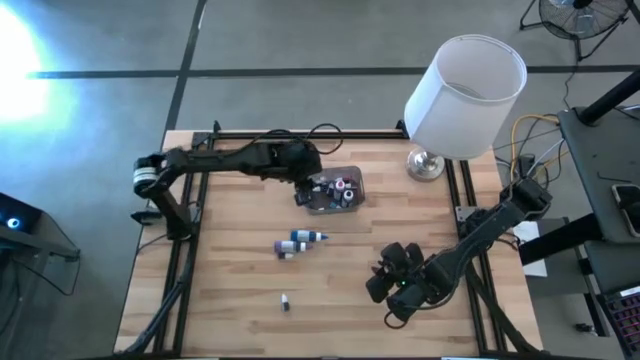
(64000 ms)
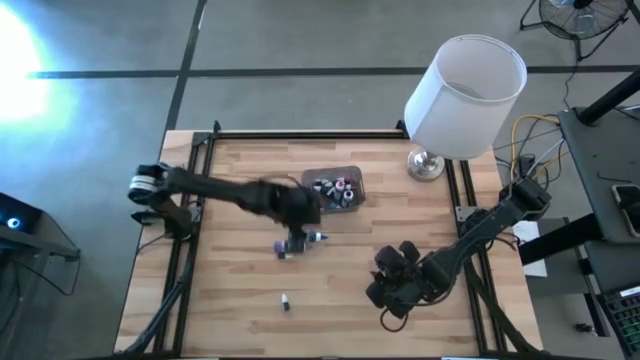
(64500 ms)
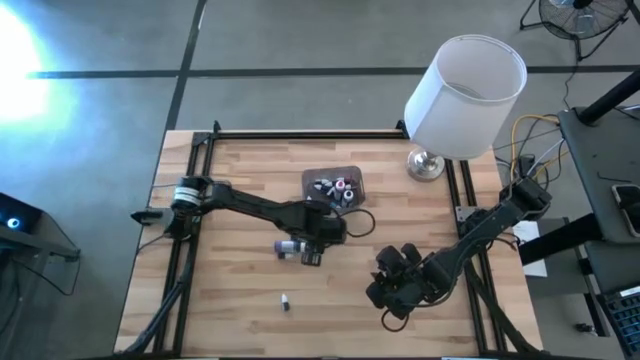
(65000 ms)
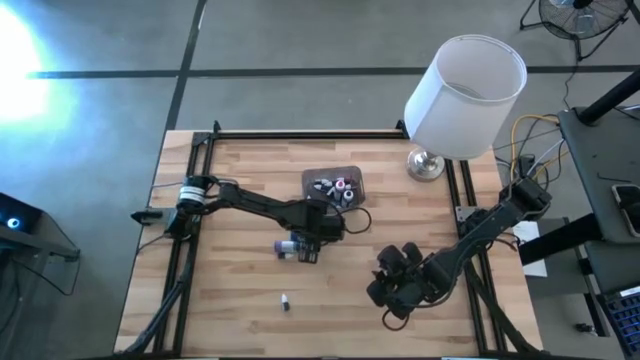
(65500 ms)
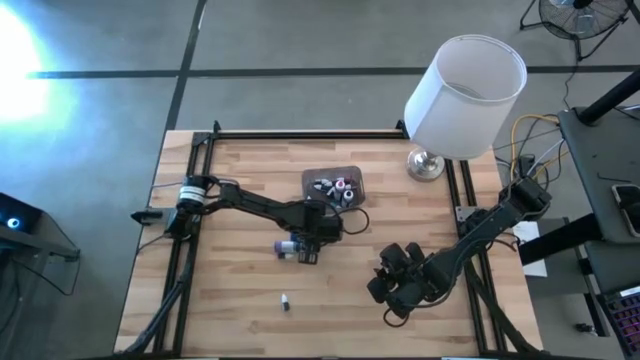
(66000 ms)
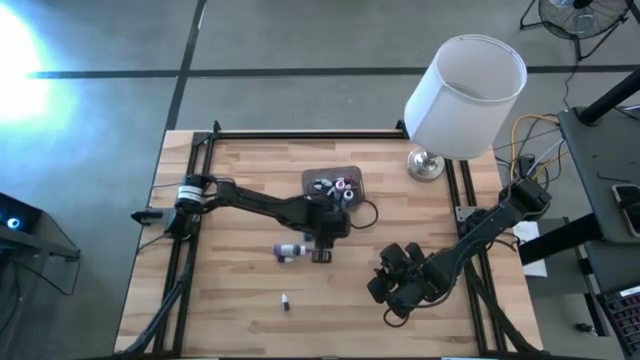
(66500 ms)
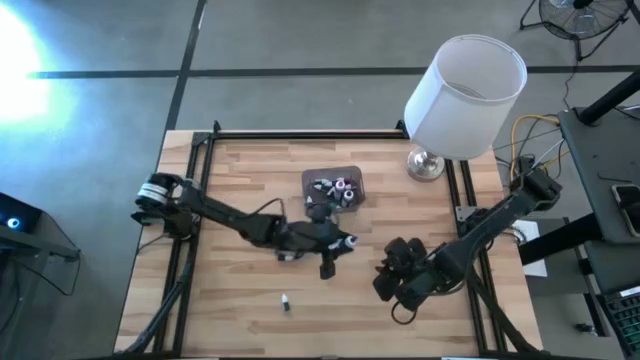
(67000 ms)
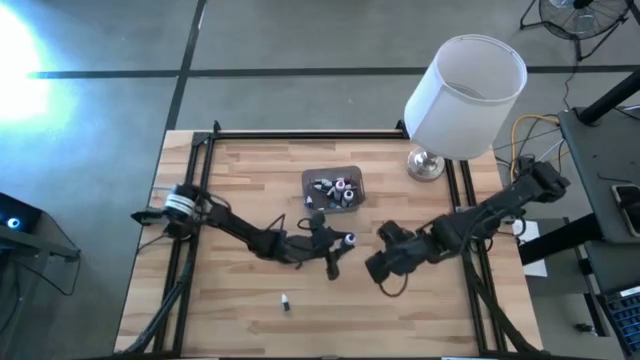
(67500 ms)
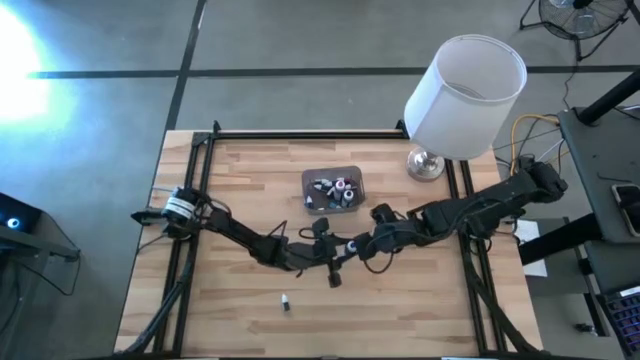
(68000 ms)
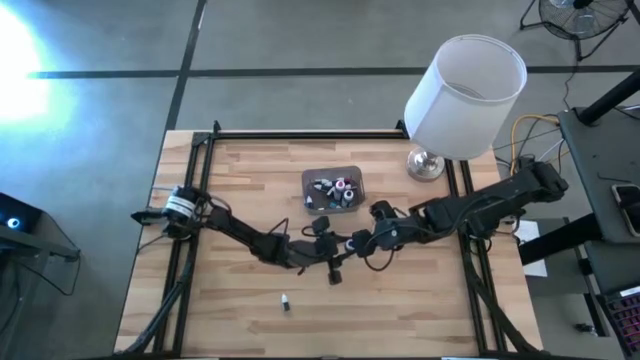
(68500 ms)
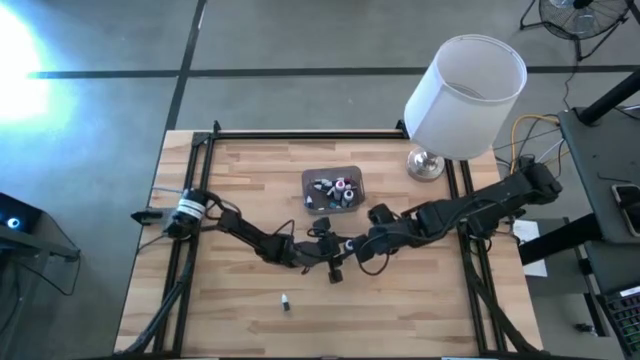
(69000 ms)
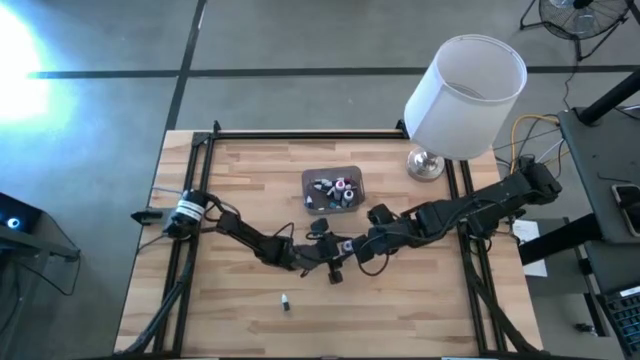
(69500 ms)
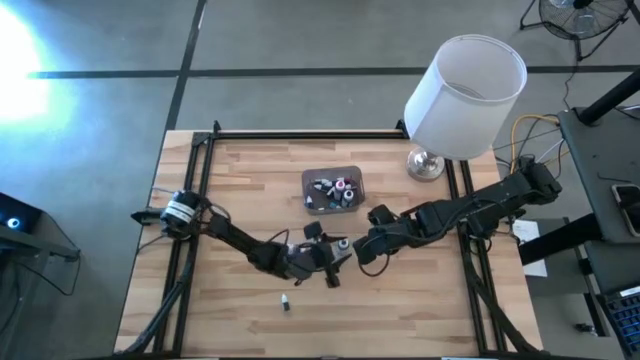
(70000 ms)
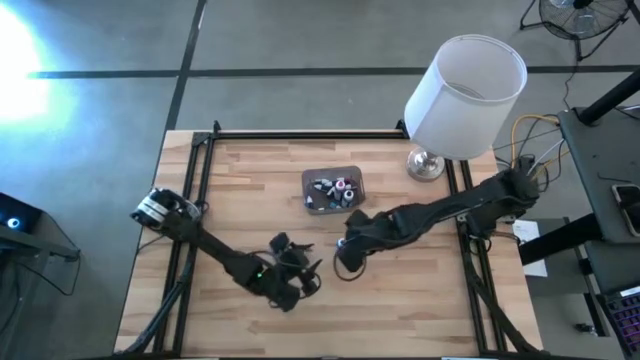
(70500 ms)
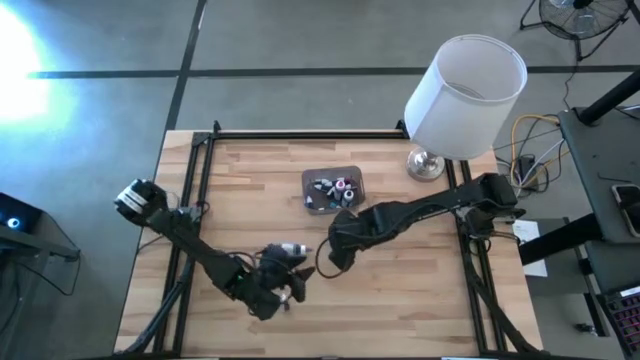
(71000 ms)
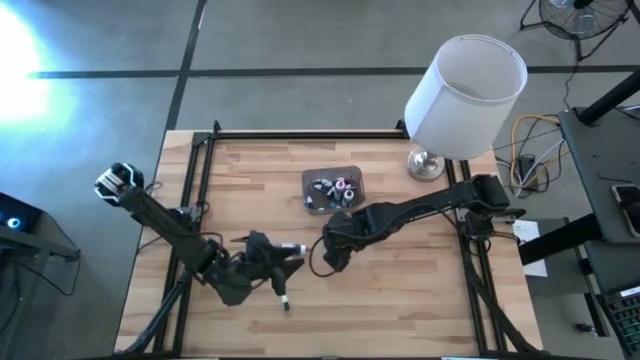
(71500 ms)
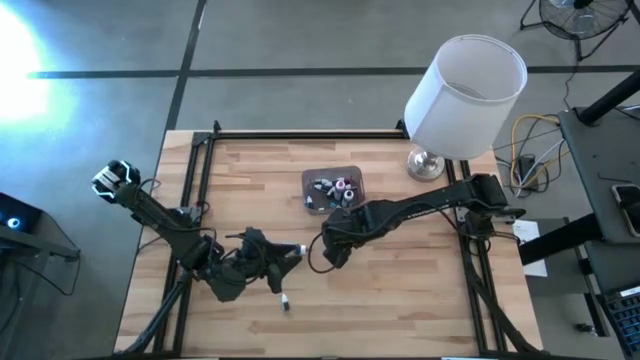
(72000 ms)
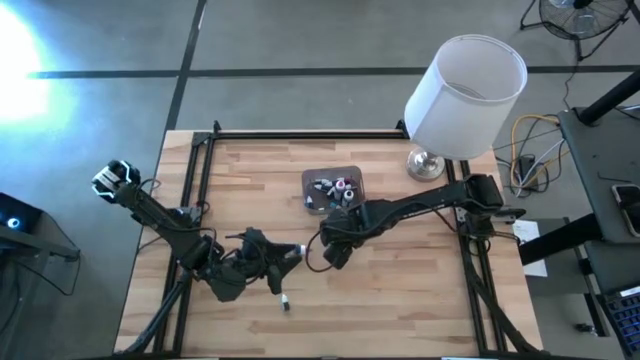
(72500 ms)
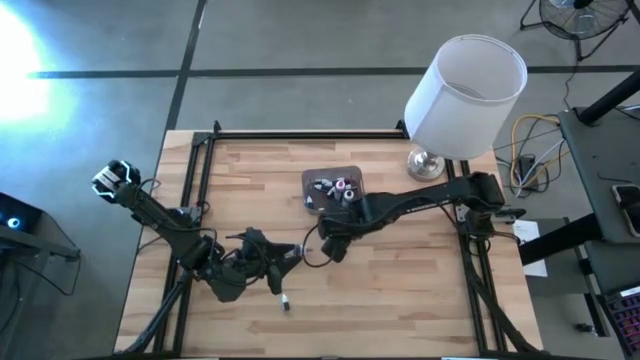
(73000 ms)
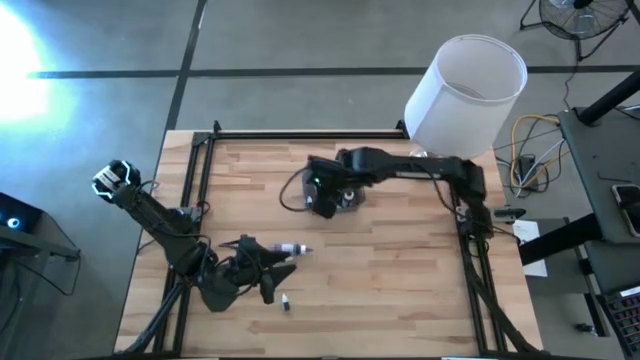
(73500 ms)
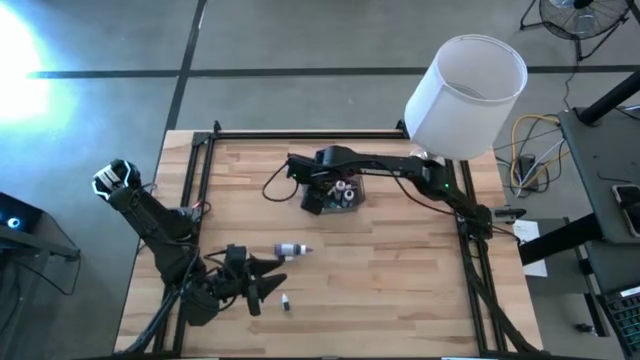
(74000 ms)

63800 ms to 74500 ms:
Task: Pick & Place food coloring
Put the large blue food coloring bottle into the bin

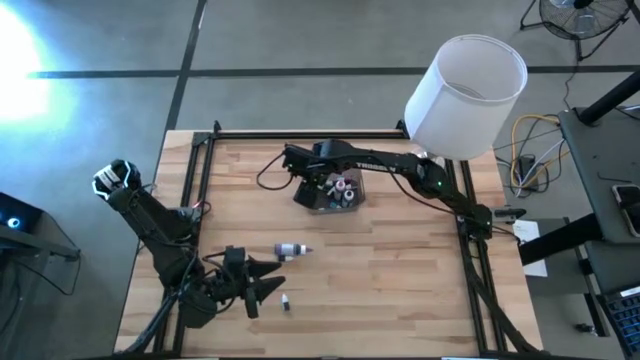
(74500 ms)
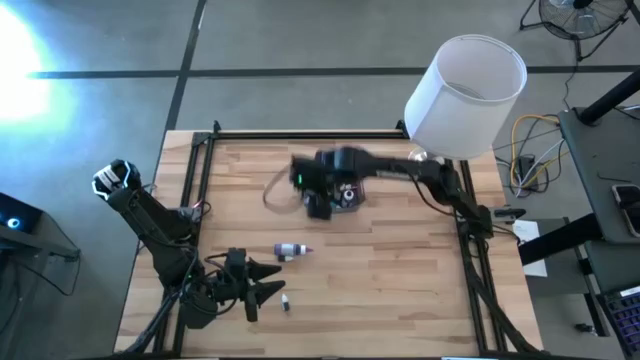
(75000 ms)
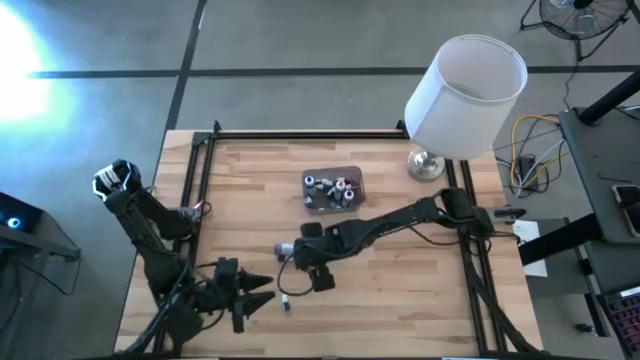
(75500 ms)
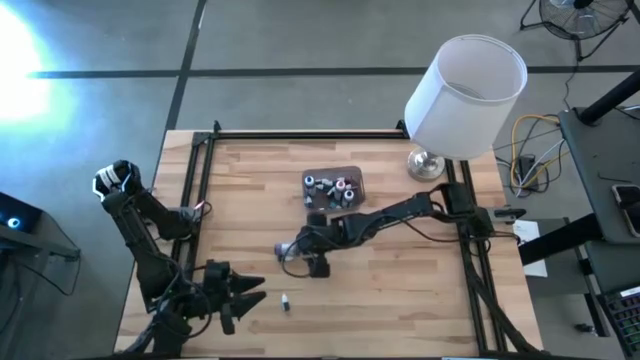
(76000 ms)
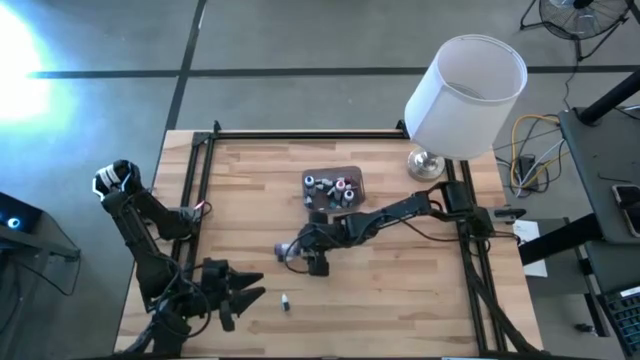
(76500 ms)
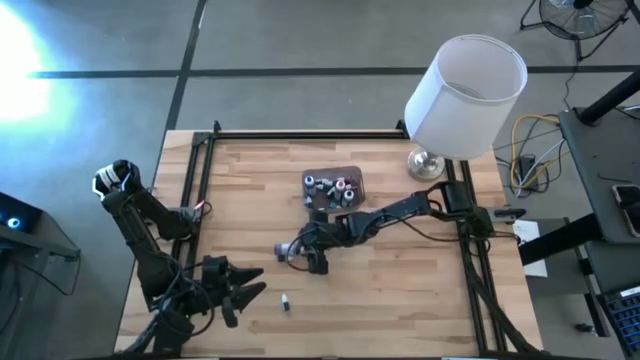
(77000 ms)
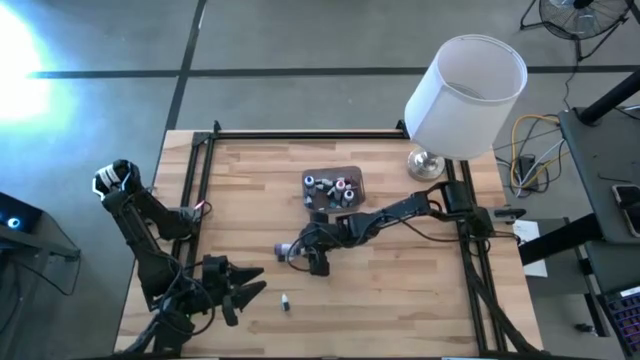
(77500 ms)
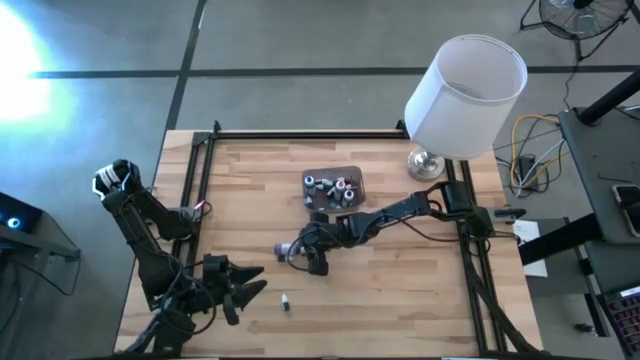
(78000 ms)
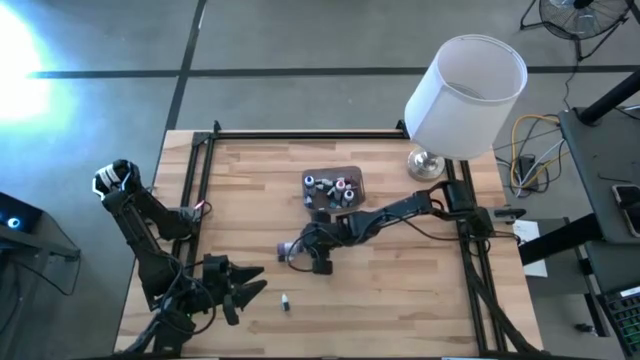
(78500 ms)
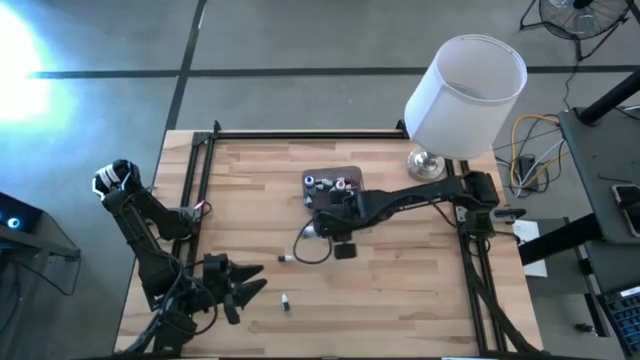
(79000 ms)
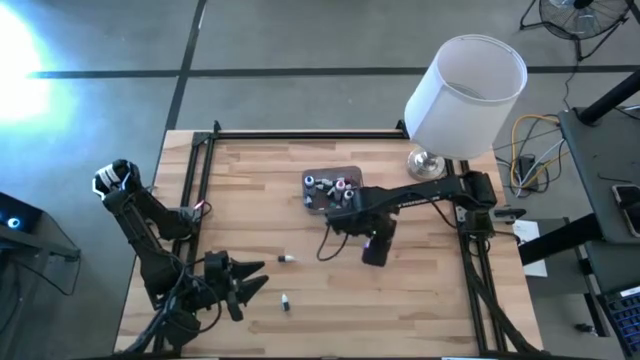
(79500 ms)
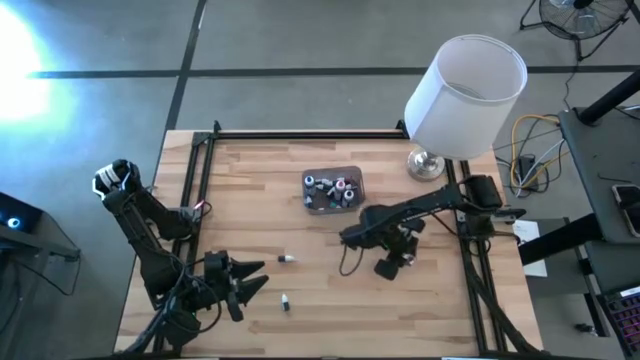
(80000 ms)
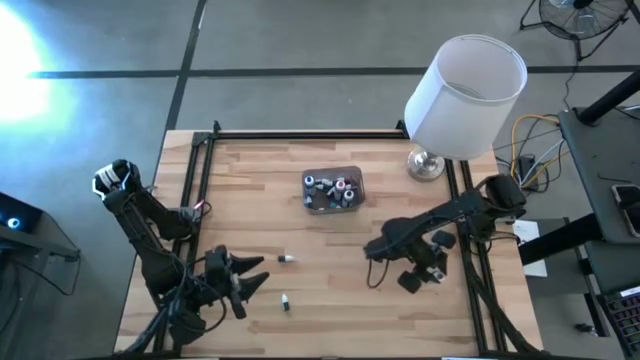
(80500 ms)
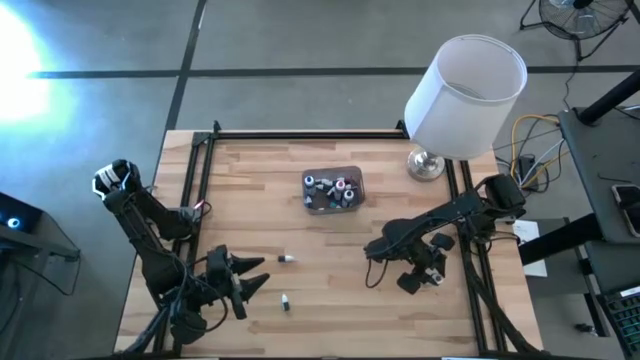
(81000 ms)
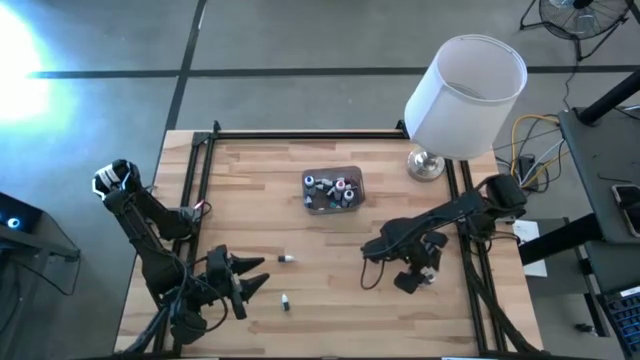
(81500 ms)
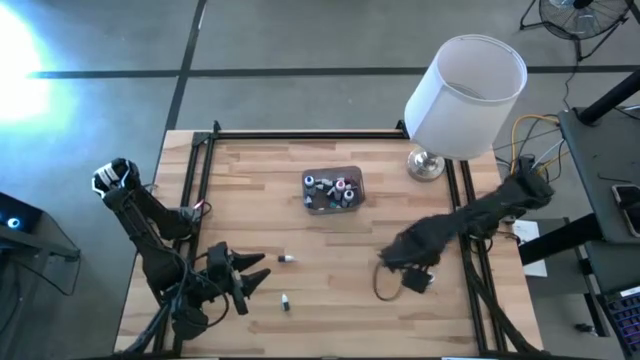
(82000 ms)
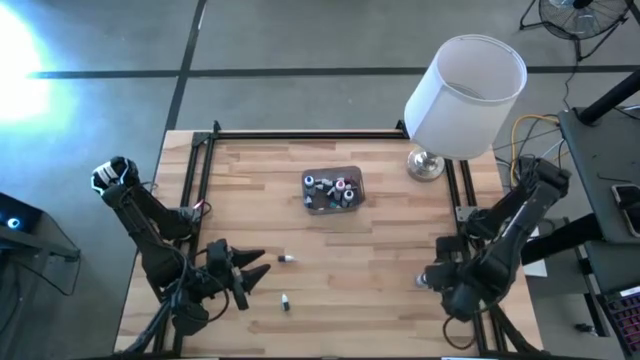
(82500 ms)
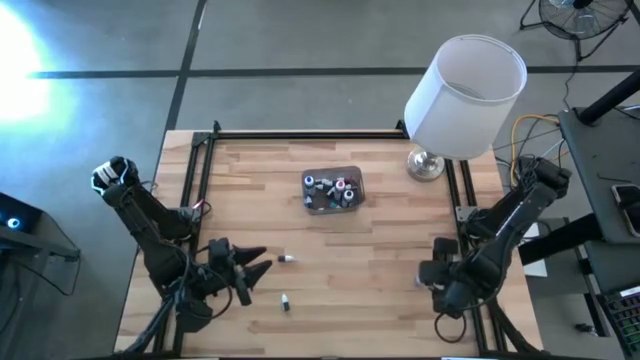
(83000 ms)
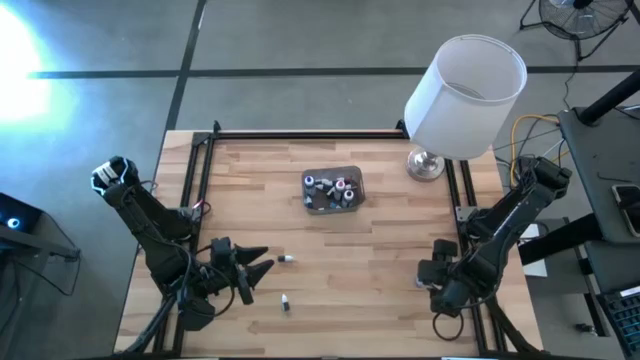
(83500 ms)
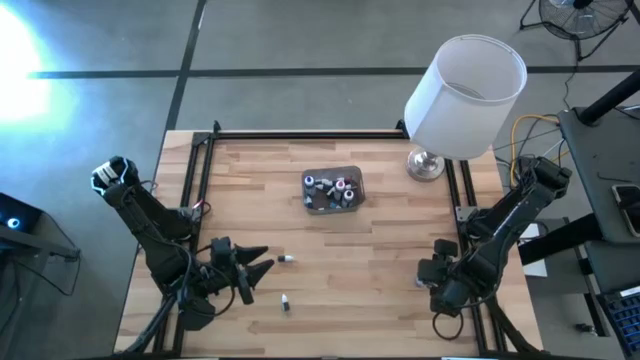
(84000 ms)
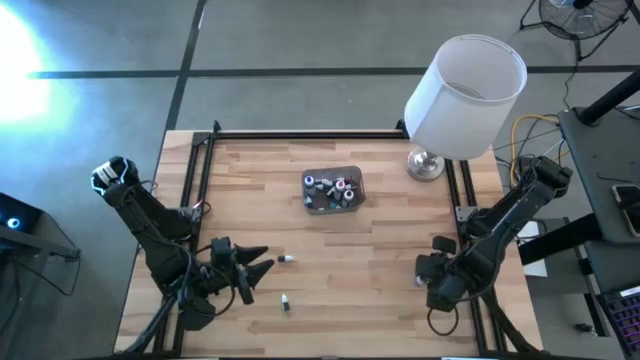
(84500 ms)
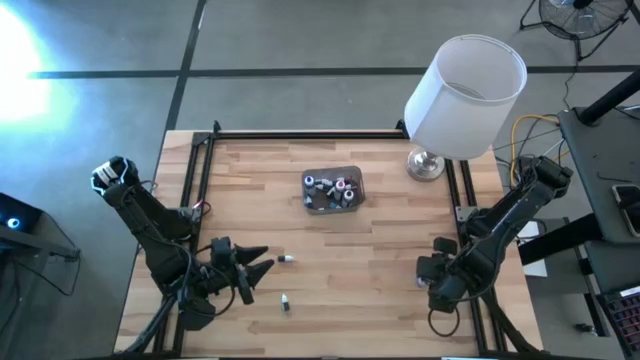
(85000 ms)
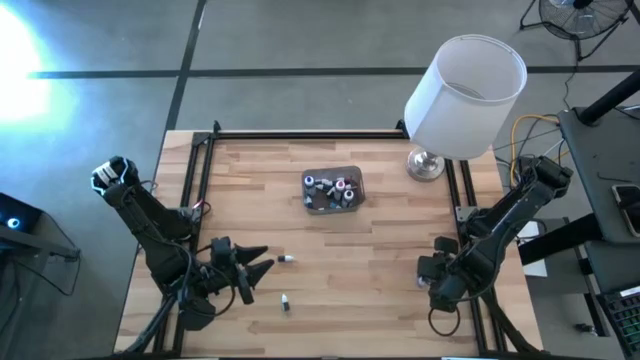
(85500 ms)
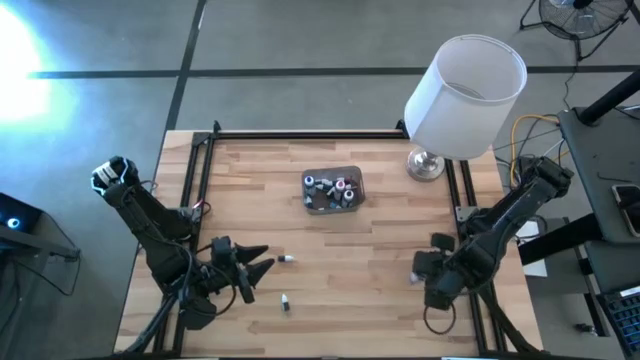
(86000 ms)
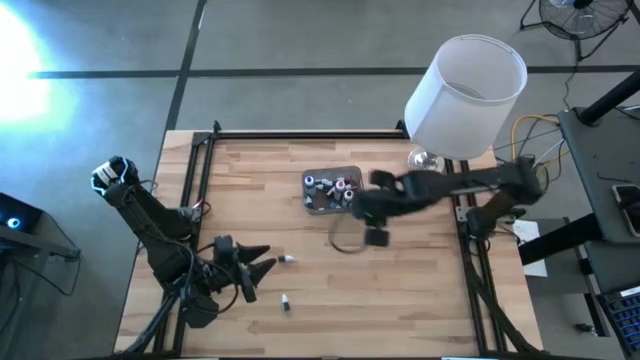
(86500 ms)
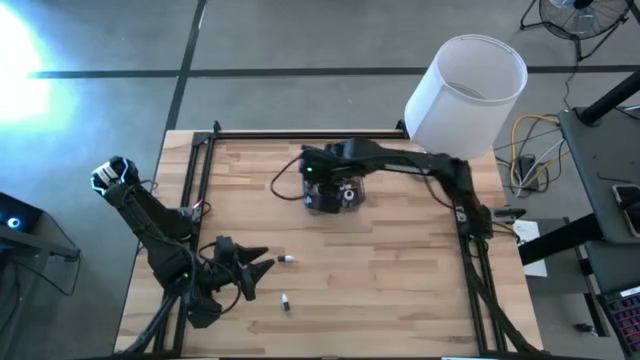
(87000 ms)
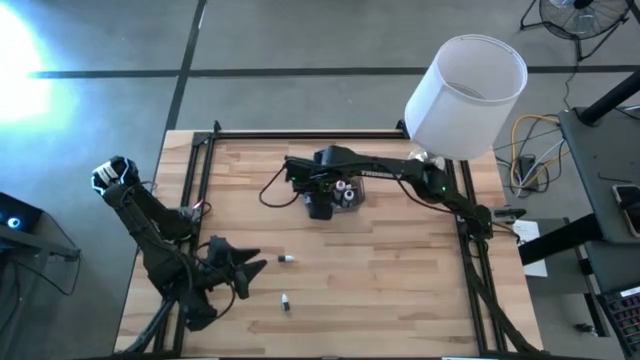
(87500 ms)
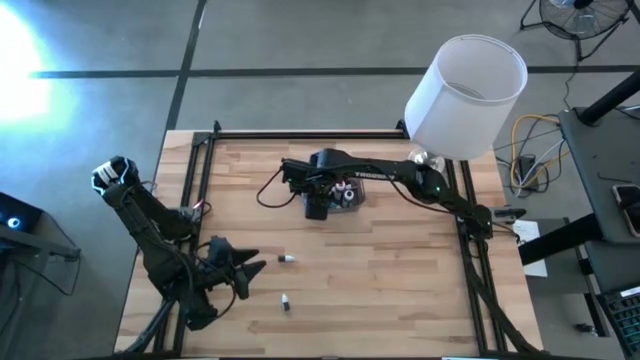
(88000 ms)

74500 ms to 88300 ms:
Put the large purple food coloring bottle into the bin
